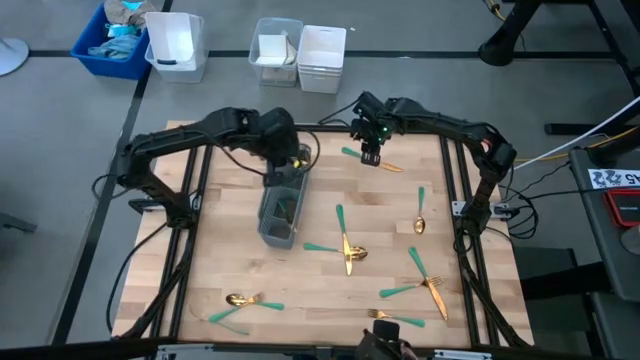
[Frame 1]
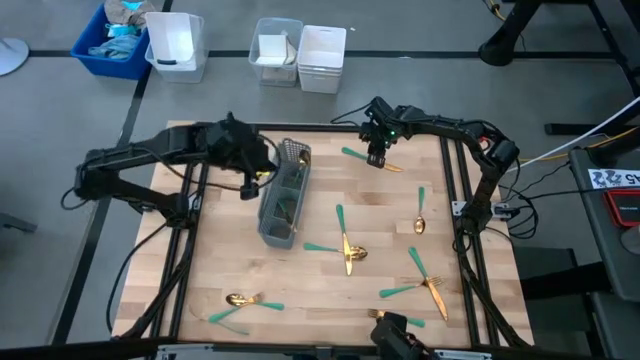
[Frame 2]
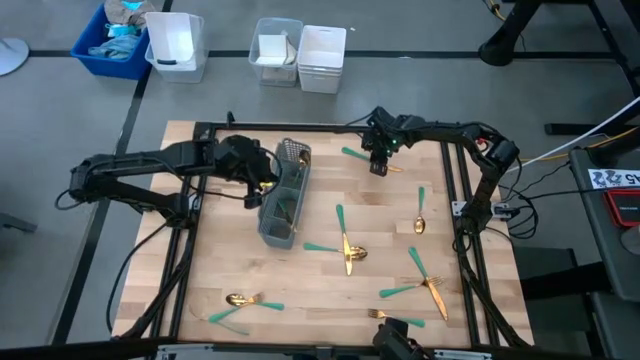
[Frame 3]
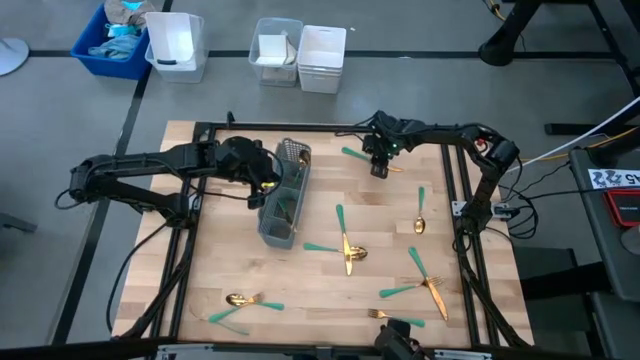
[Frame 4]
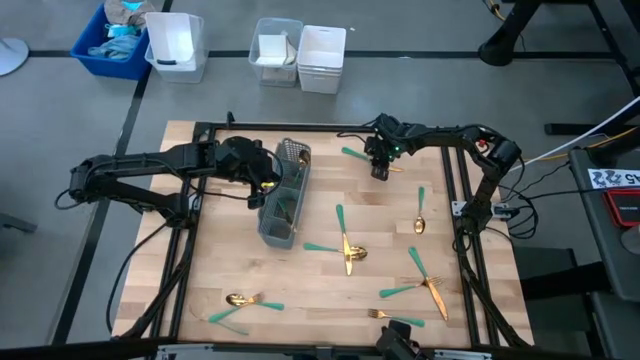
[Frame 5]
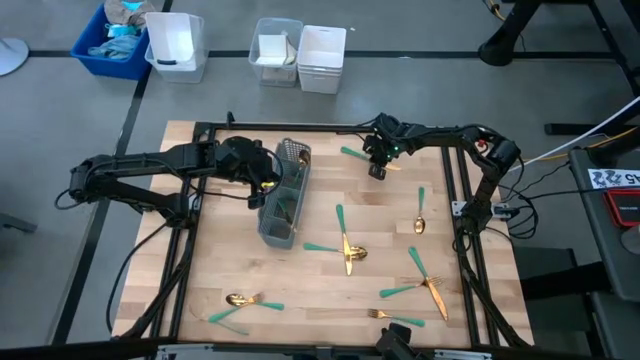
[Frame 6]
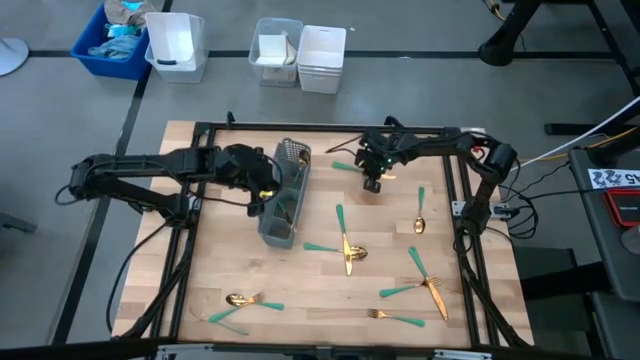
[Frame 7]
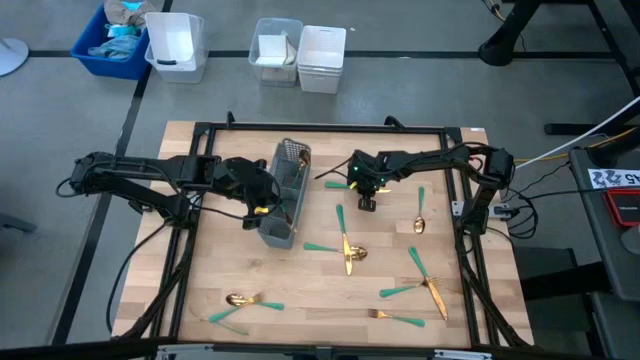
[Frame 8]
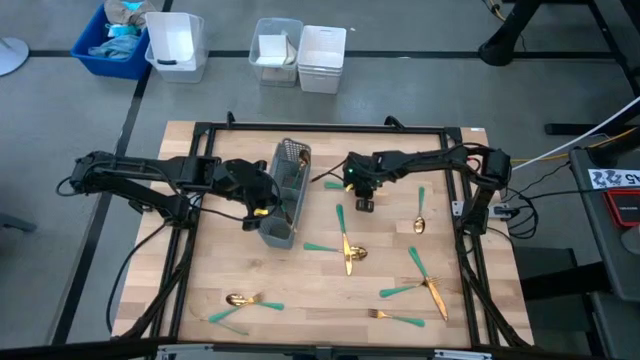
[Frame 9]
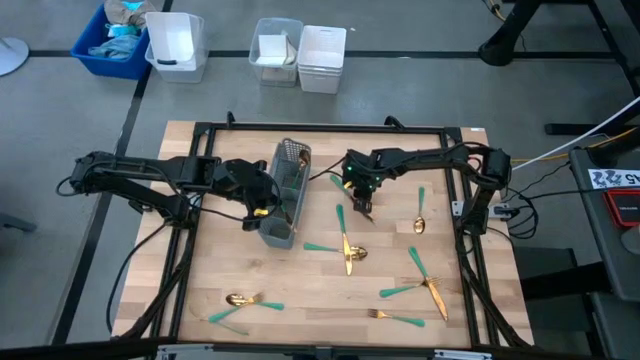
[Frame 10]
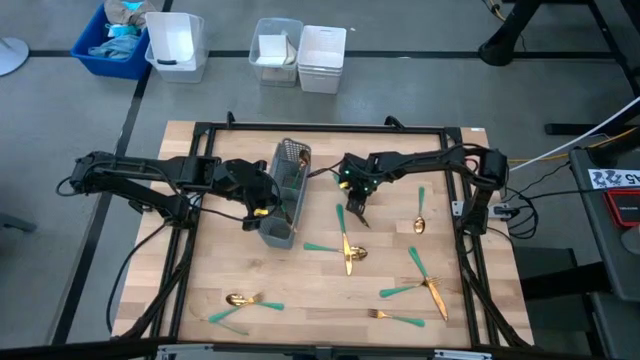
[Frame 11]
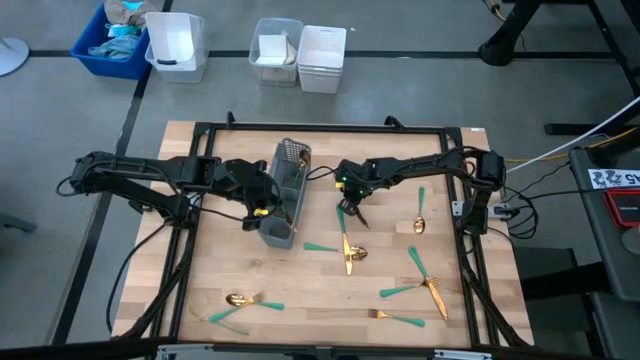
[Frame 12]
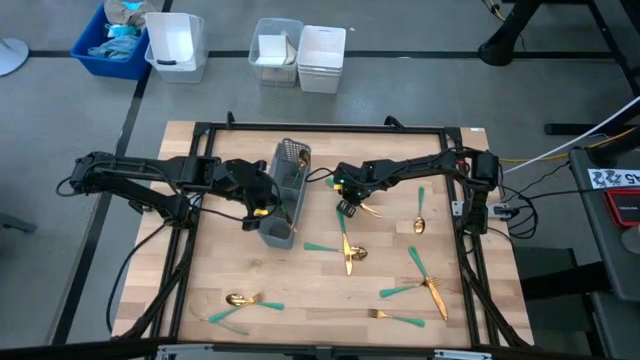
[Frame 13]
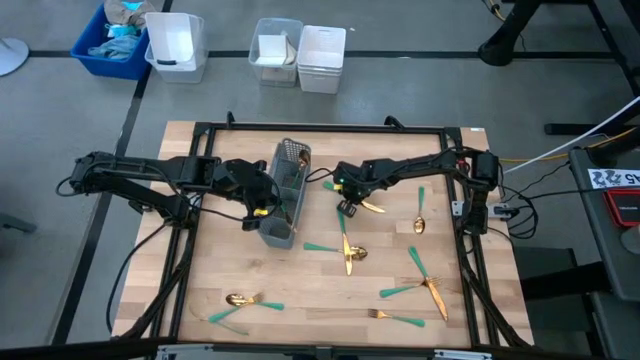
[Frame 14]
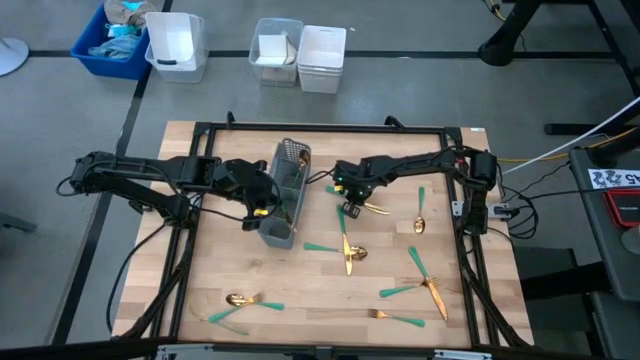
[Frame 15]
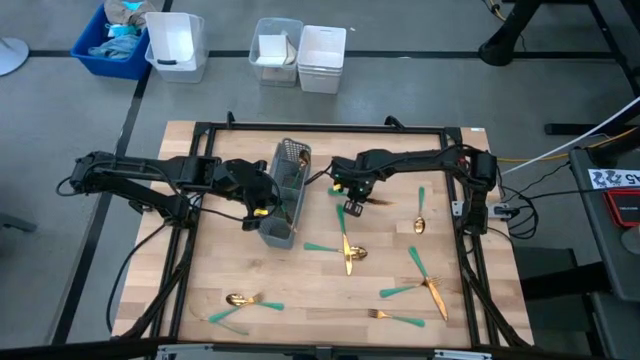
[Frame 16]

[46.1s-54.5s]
Task: Sort silverware
Put the green table knife into the gray silverware rack

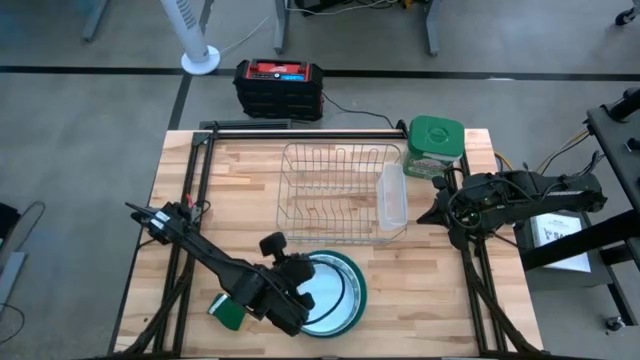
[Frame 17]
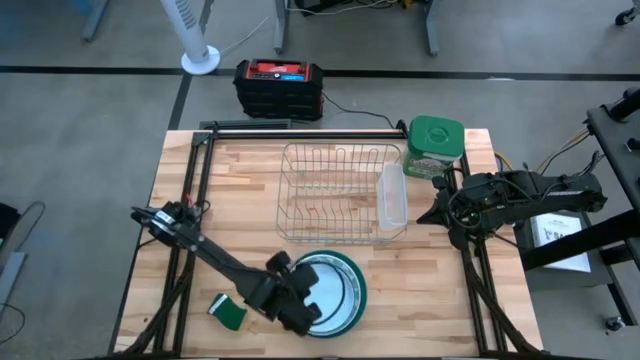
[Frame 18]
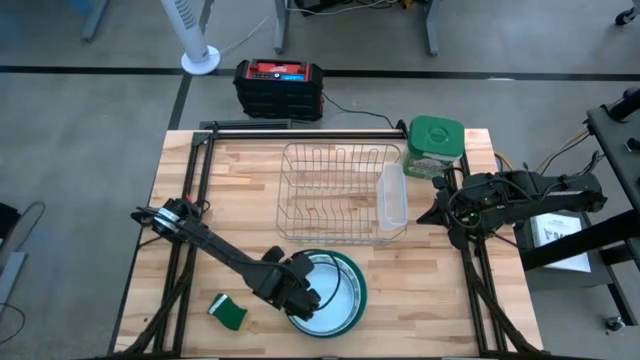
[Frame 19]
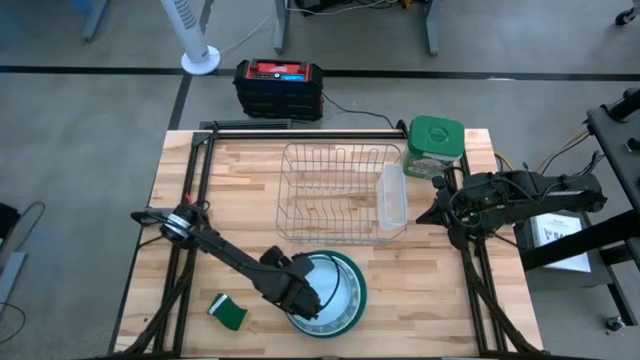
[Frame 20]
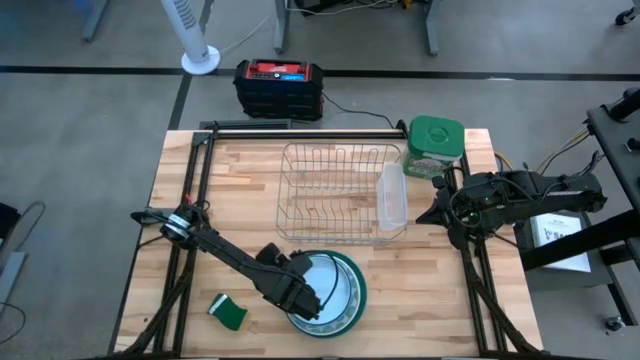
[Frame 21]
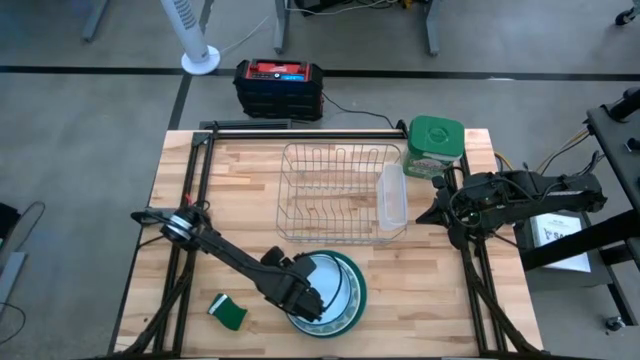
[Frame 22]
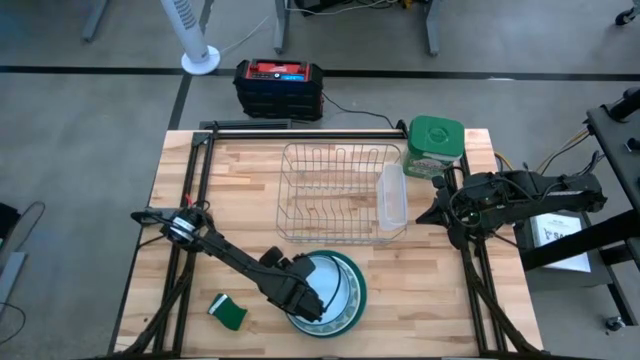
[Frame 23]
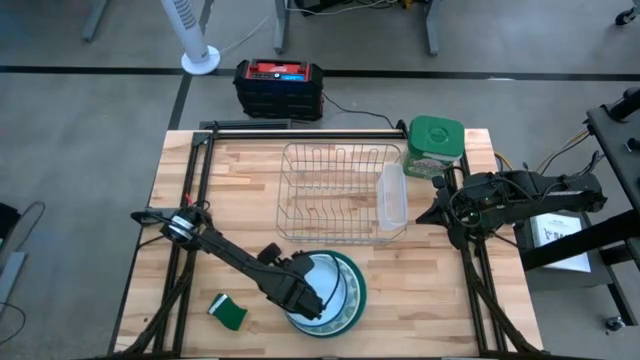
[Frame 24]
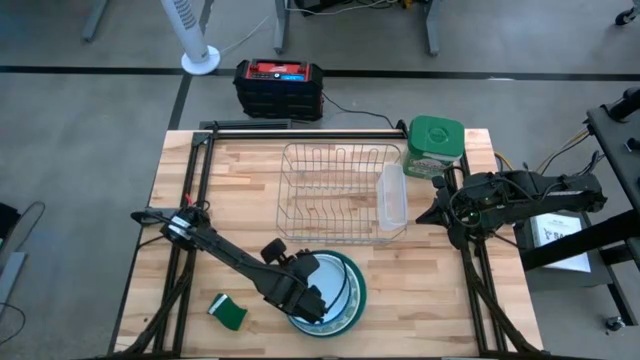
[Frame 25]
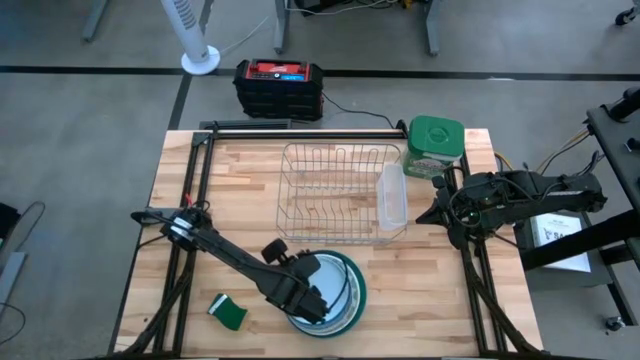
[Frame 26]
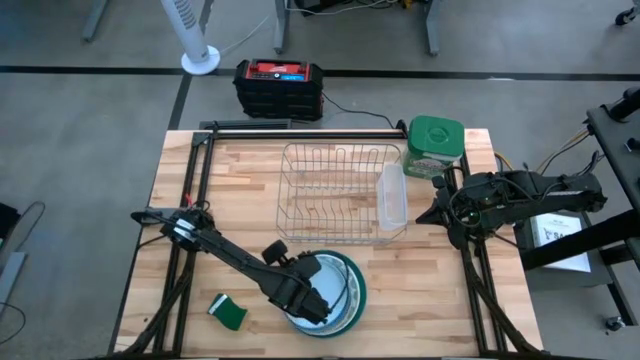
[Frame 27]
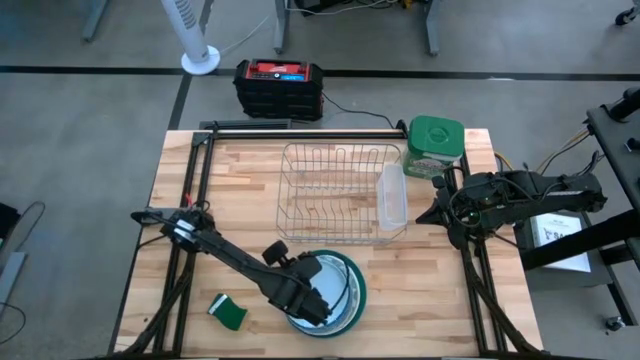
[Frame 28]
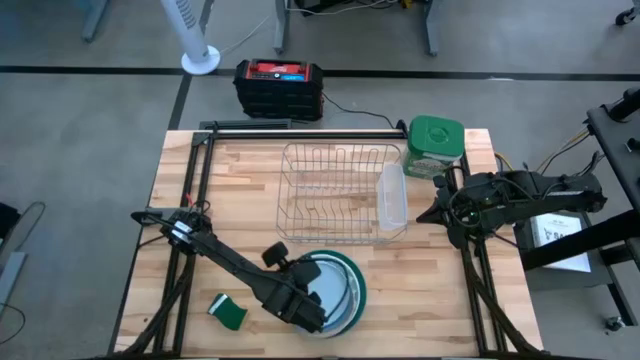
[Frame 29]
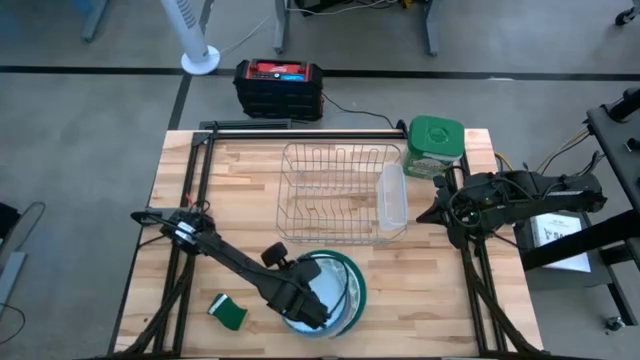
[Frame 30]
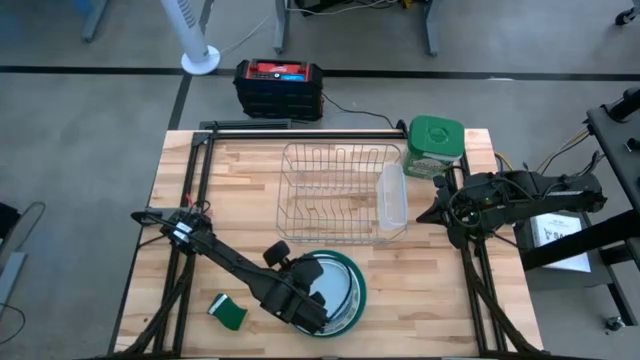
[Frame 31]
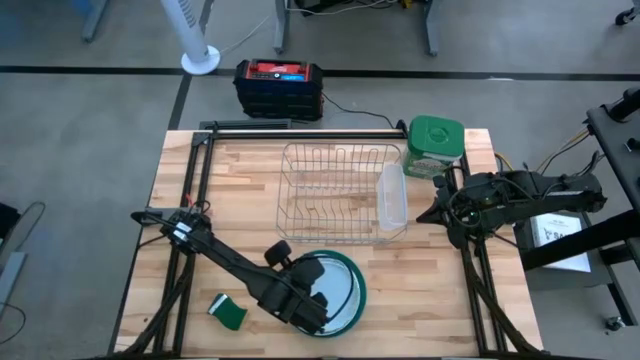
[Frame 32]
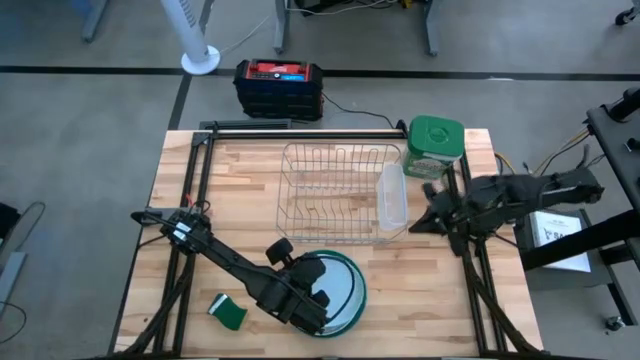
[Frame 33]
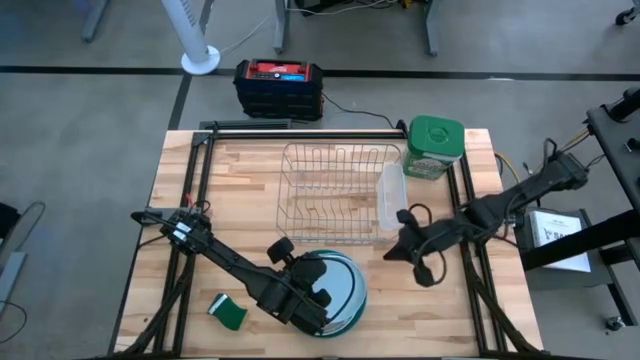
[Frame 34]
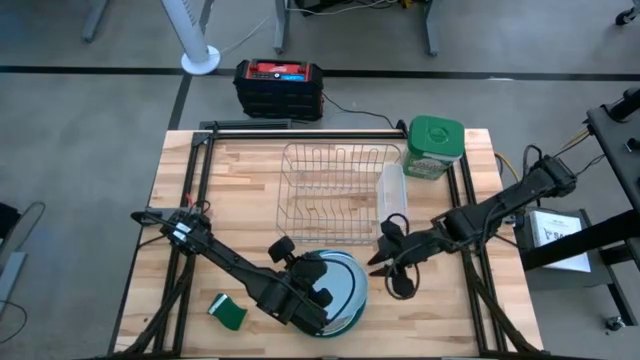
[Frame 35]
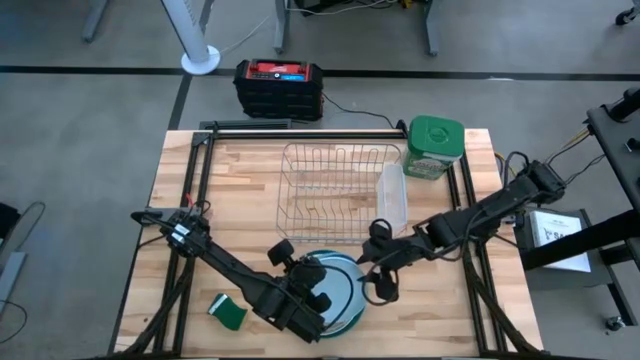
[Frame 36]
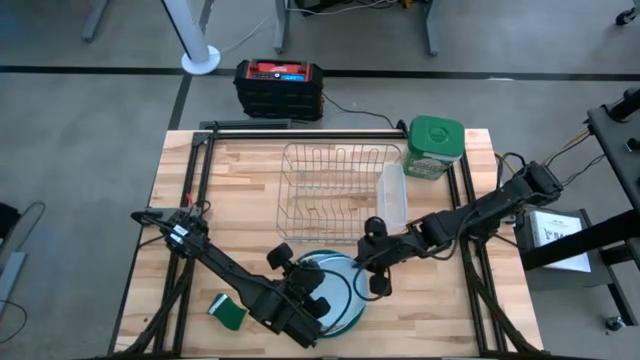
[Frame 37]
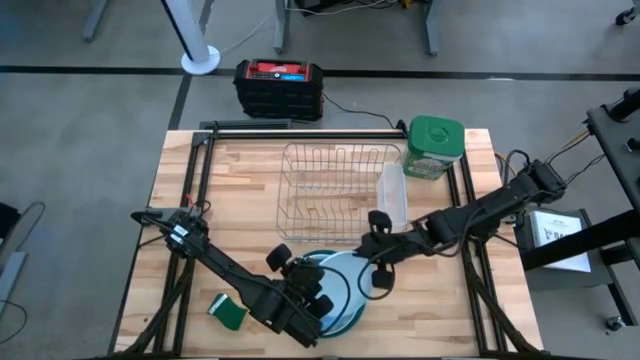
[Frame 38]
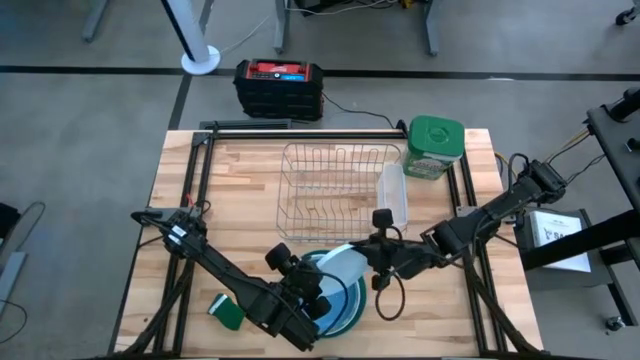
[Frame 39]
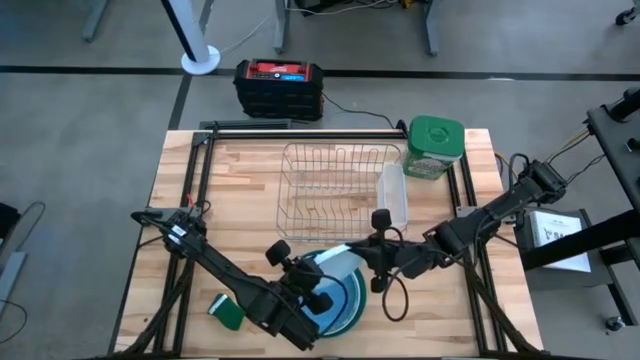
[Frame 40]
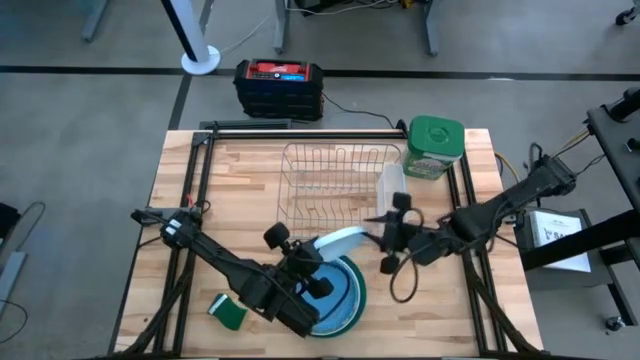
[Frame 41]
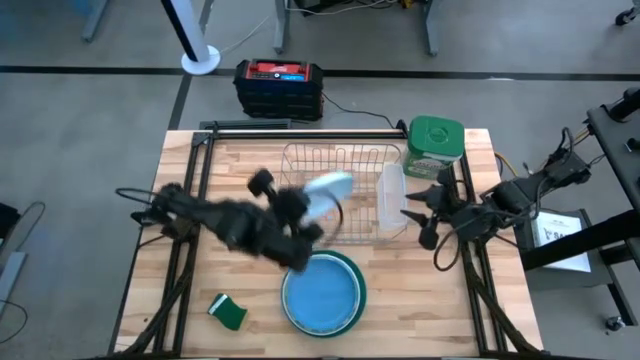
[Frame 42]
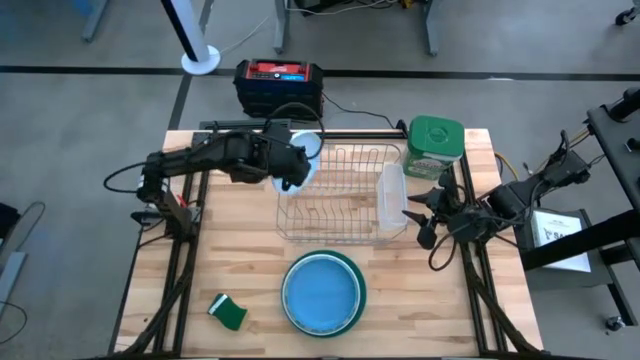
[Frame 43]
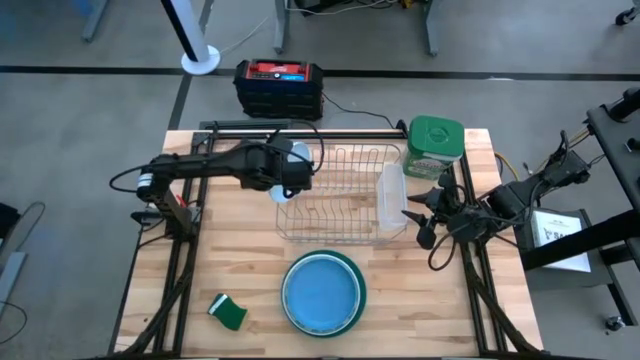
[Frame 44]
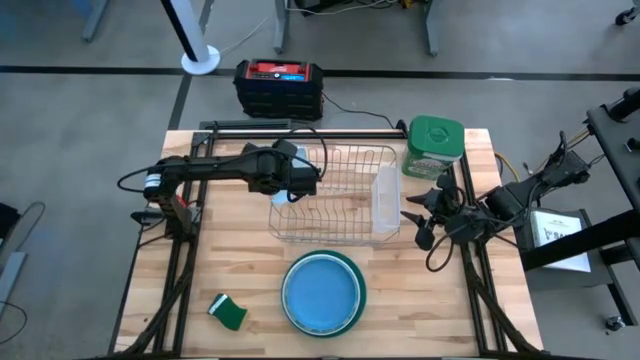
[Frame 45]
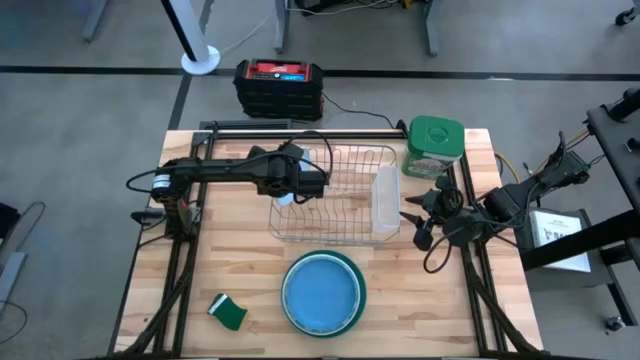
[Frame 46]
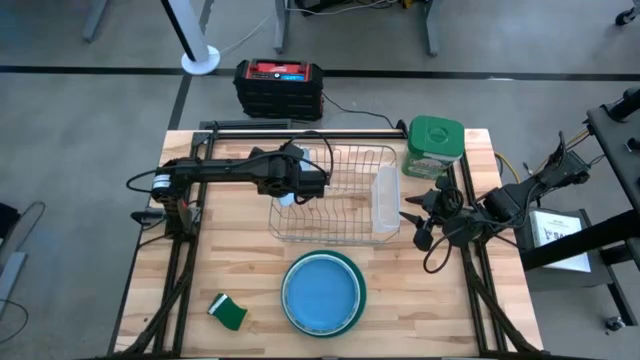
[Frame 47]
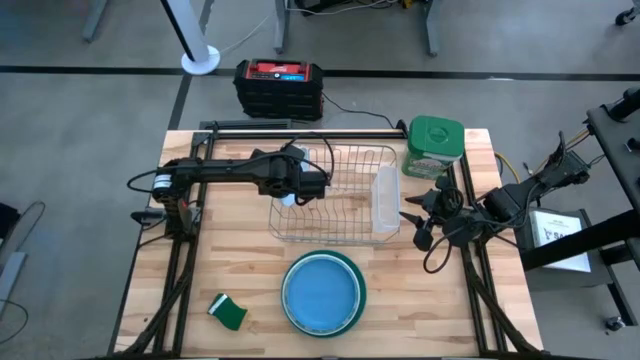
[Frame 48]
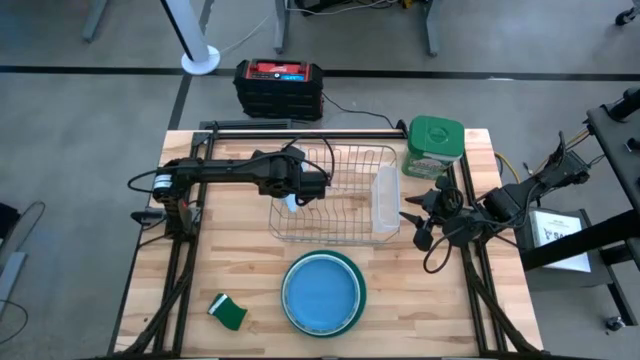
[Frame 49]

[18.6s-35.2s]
Task: Sort dishes
Put the light blue plate in the dish rack
